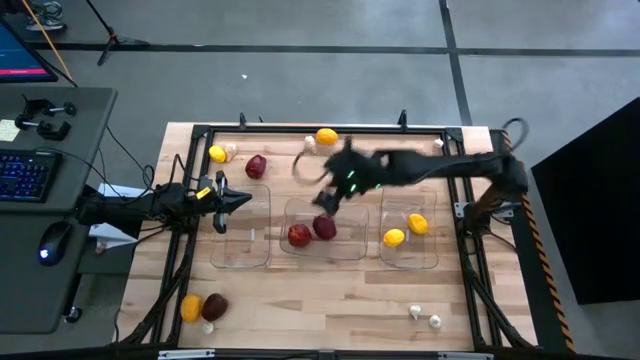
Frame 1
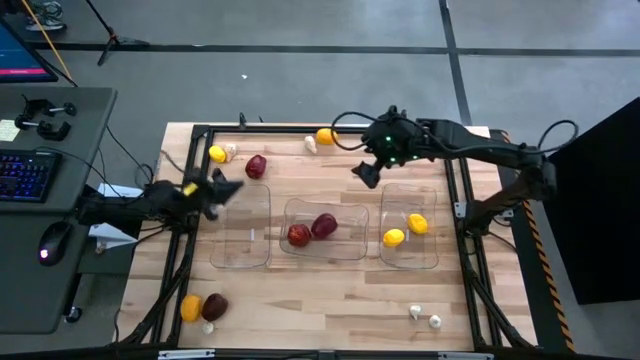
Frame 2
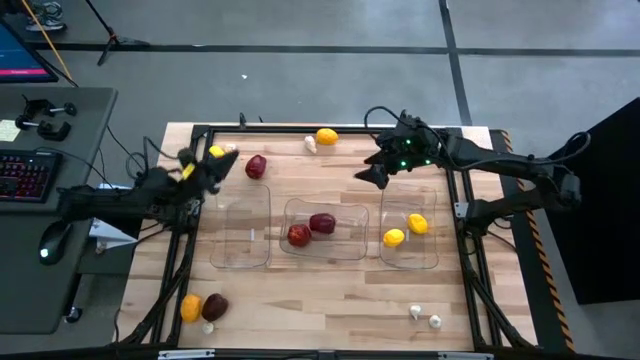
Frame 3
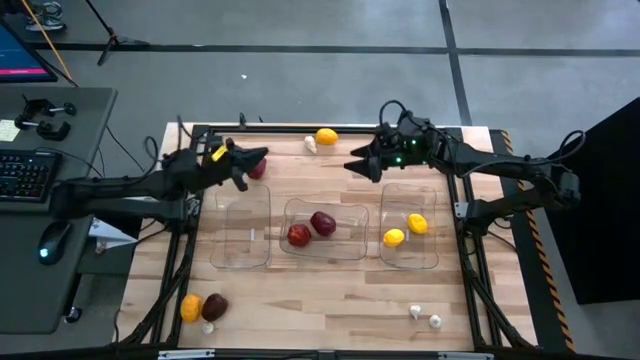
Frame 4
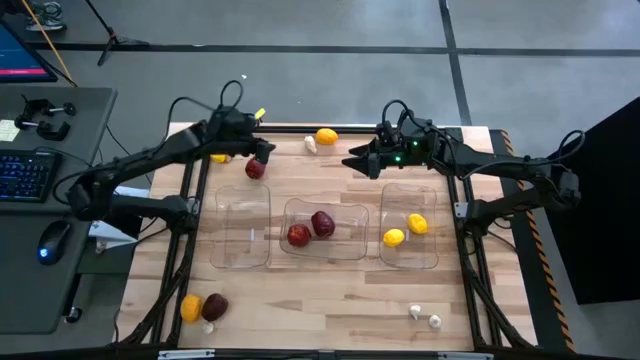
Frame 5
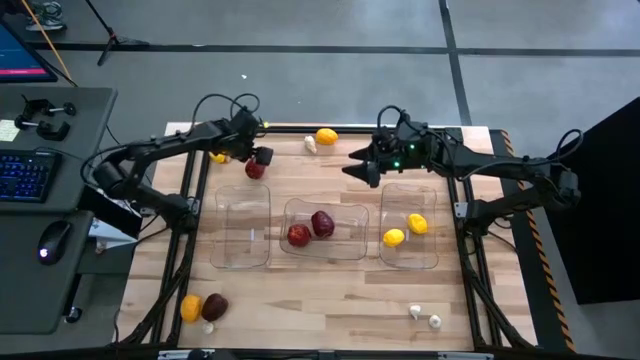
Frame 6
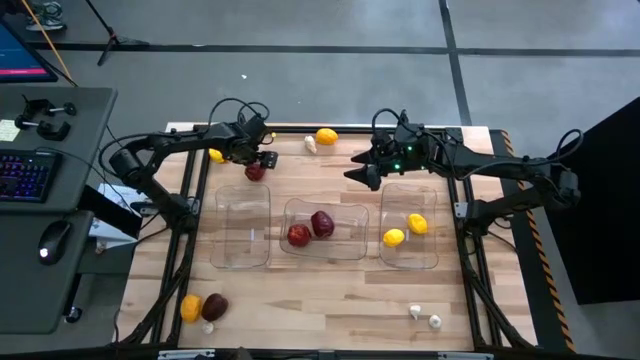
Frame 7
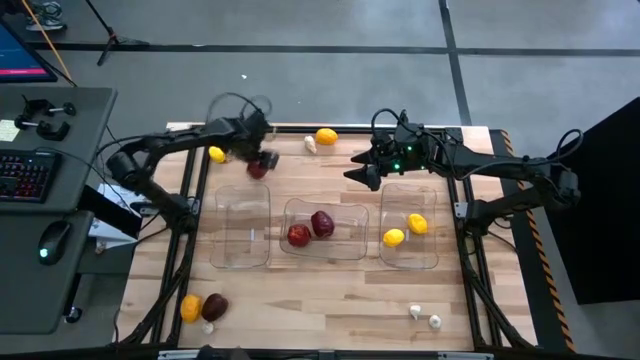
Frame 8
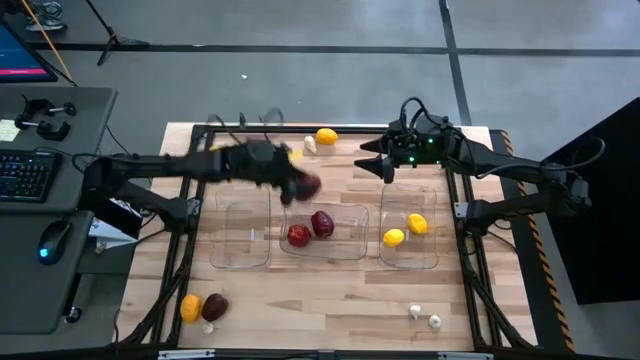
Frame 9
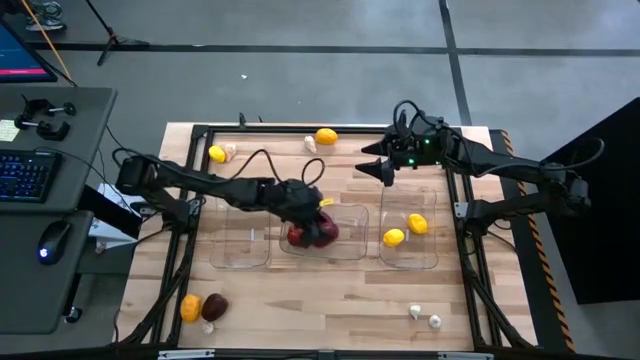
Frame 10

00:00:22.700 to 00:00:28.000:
Task: Sort produce into baskets
Put the top red apple into the center transparent bin

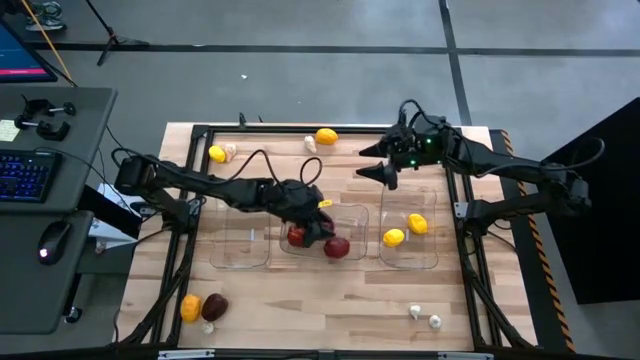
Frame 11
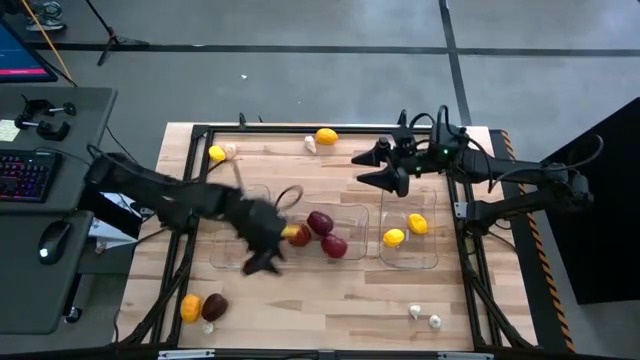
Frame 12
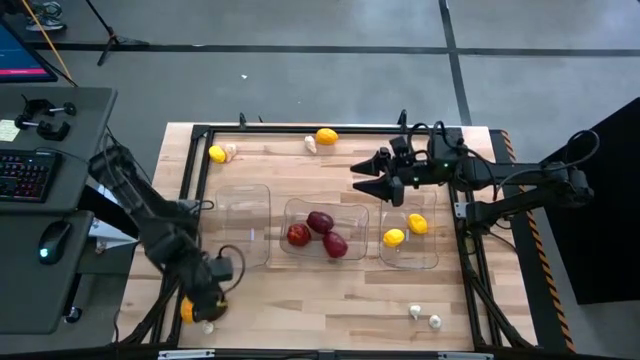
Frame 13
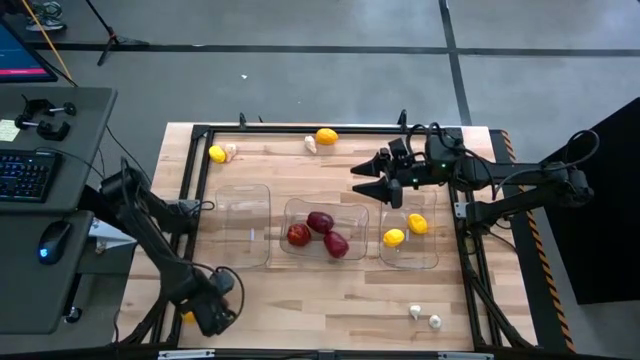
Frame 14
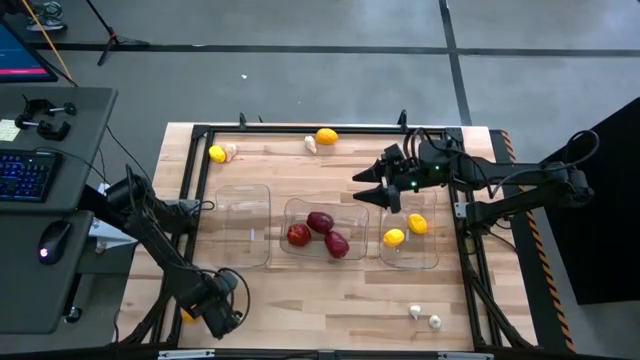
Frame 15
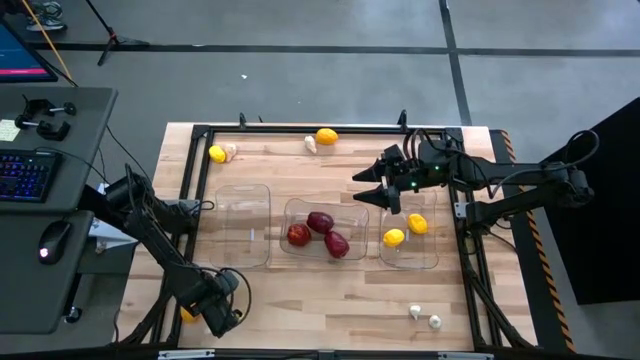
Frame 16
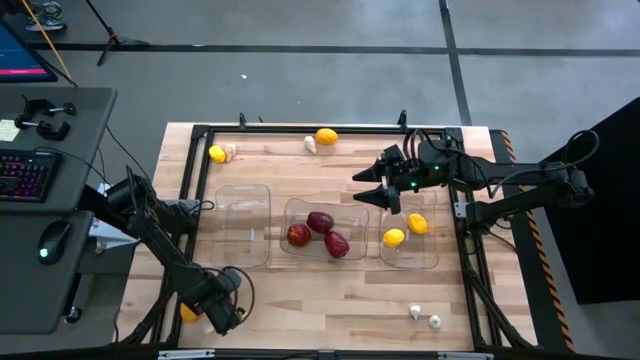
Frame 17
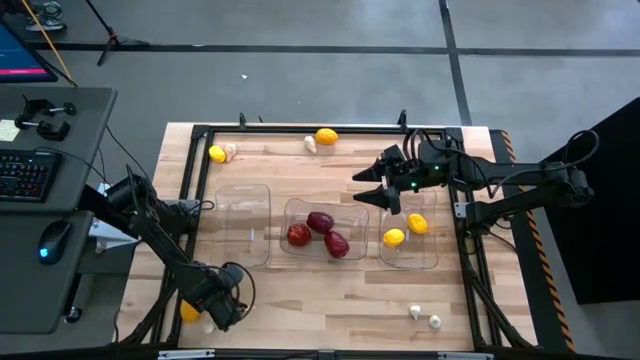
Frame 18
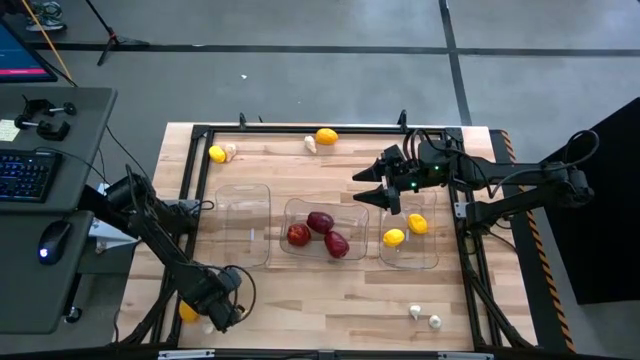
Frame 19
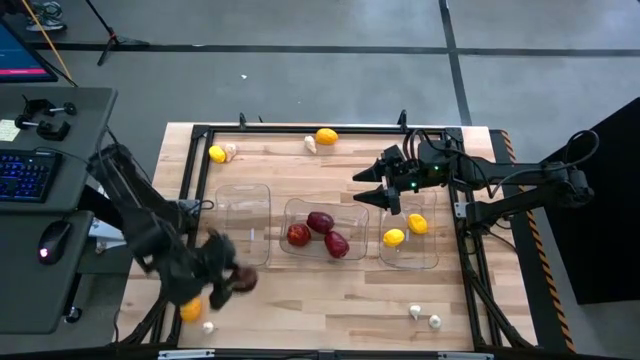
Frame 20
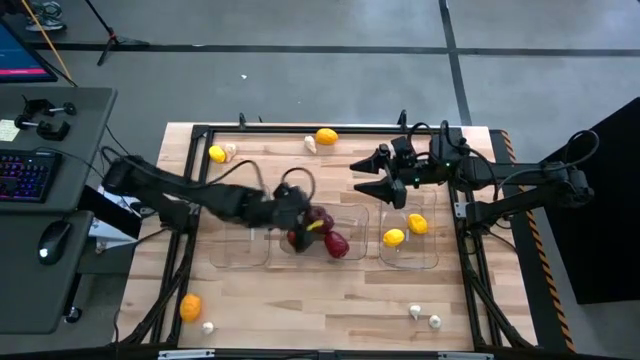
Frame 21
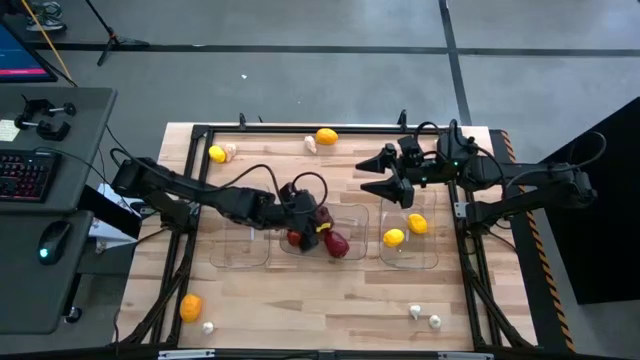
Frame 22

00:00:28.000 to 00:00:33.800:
Put the red apple into the center transparent bin

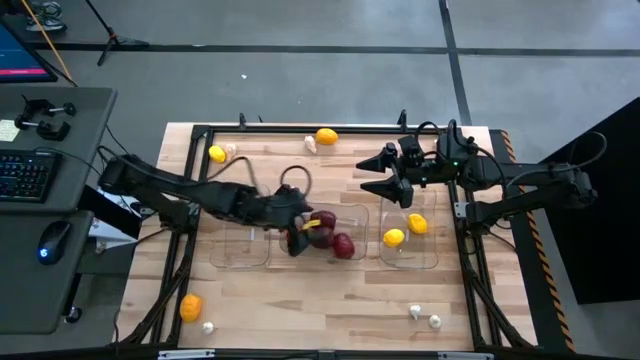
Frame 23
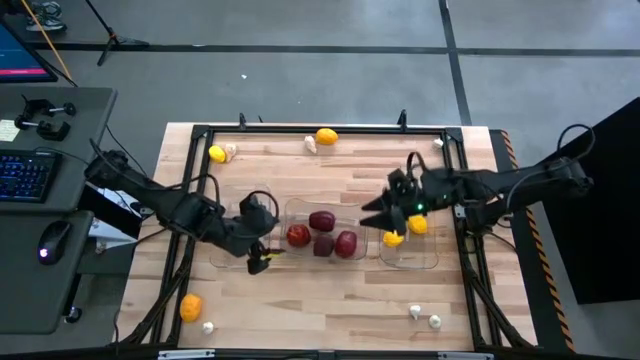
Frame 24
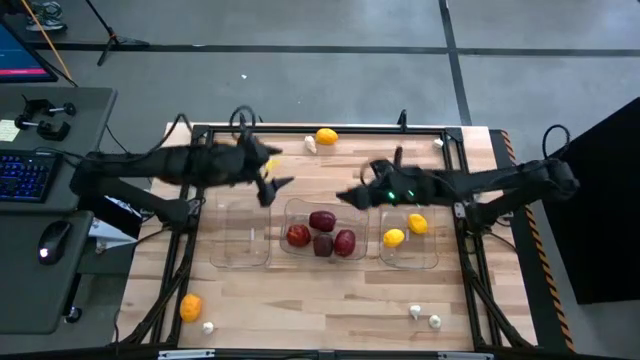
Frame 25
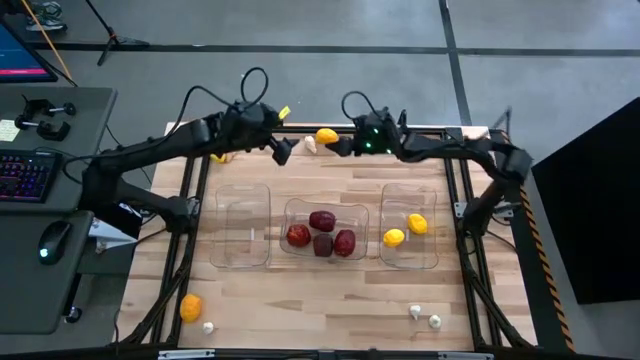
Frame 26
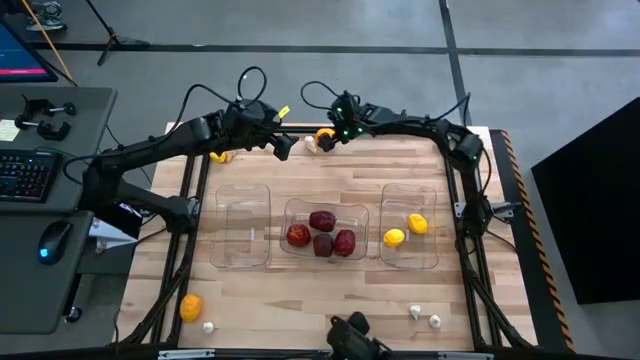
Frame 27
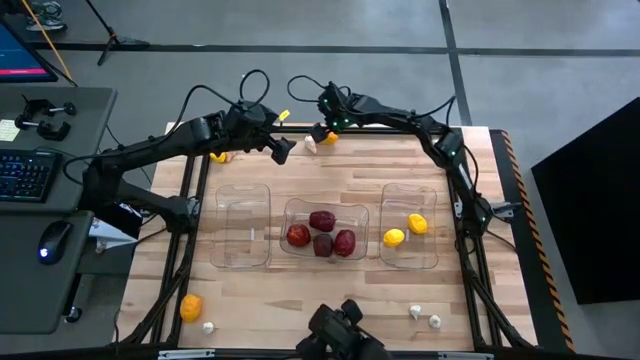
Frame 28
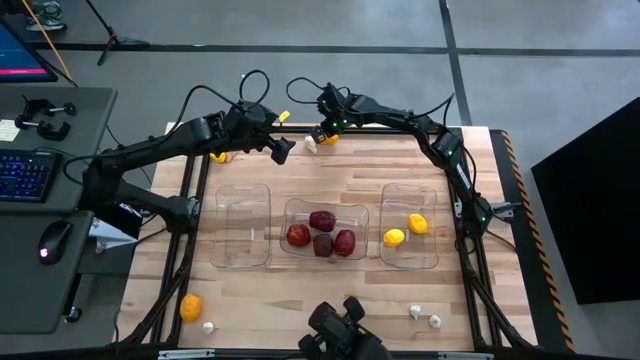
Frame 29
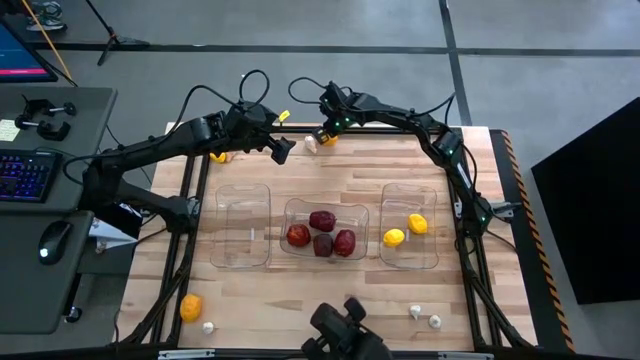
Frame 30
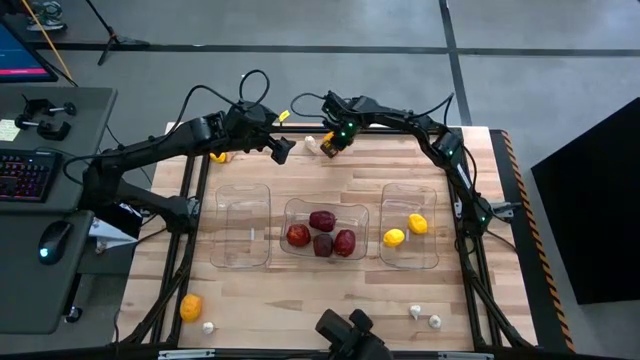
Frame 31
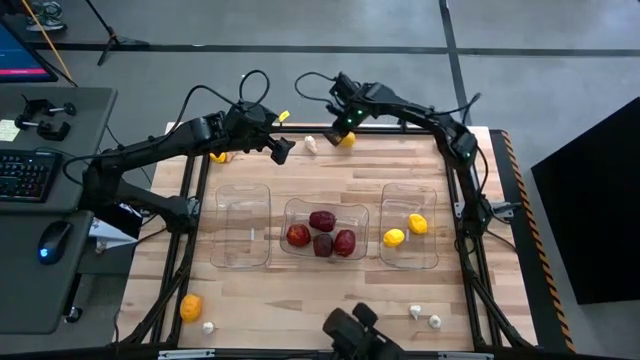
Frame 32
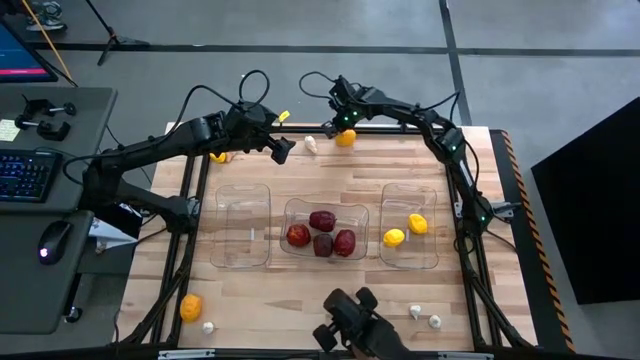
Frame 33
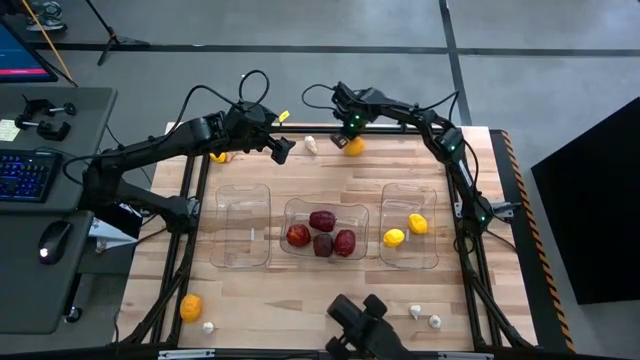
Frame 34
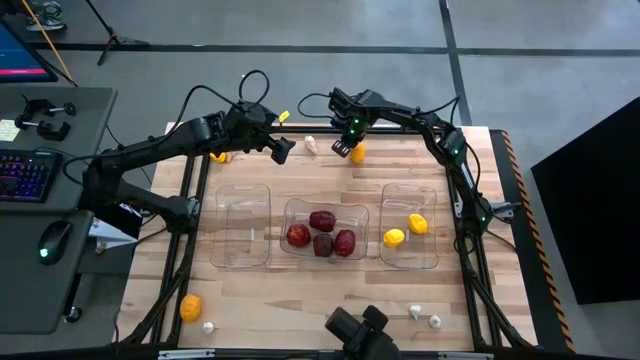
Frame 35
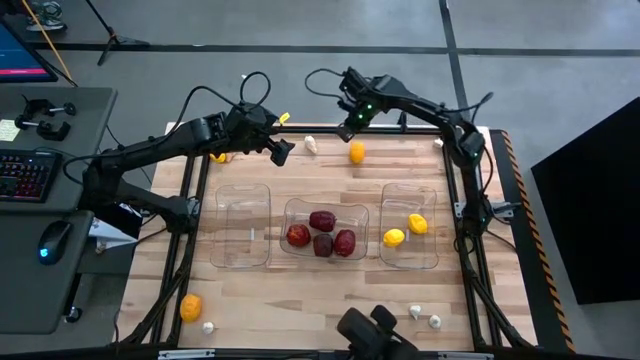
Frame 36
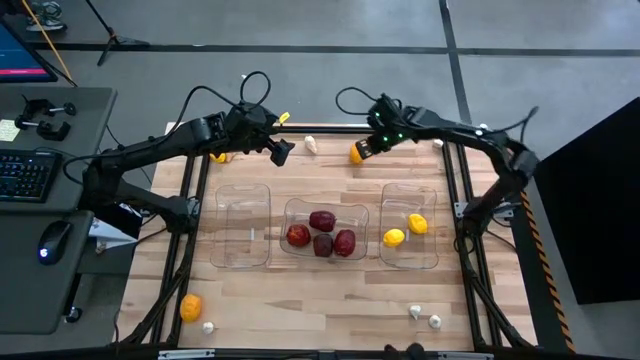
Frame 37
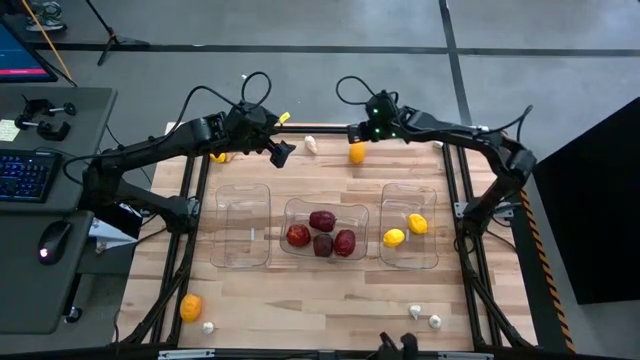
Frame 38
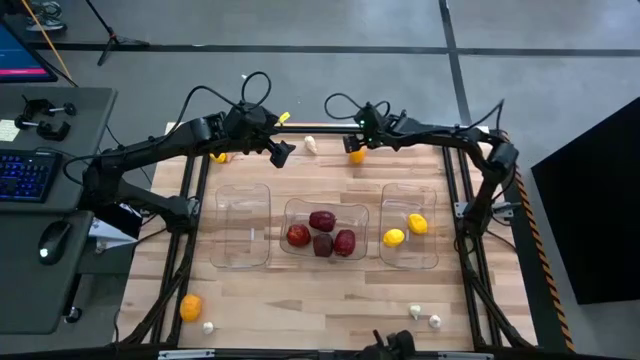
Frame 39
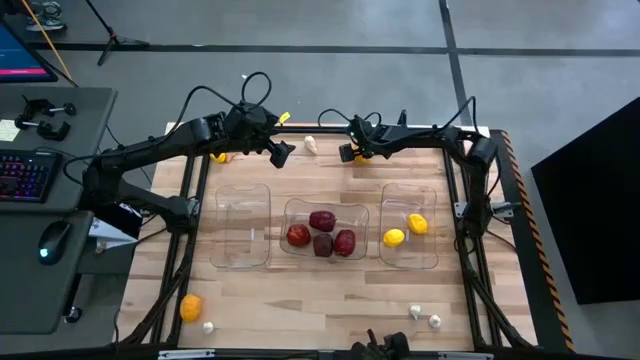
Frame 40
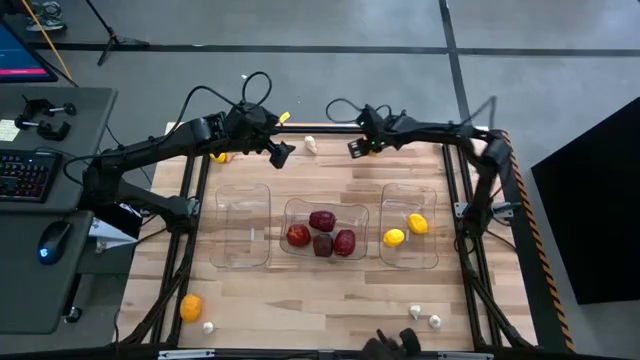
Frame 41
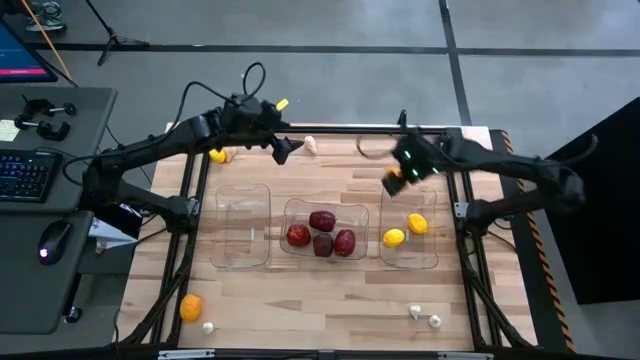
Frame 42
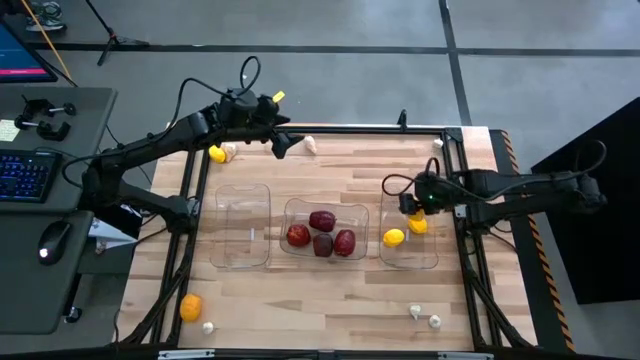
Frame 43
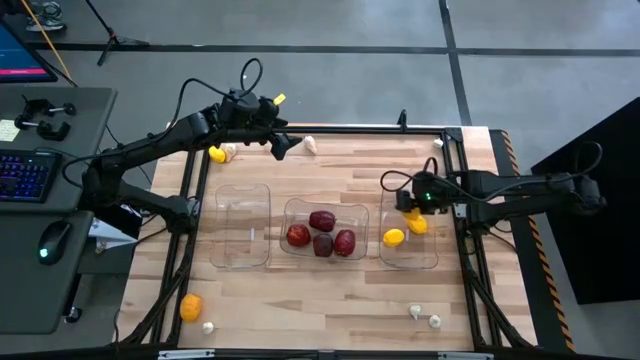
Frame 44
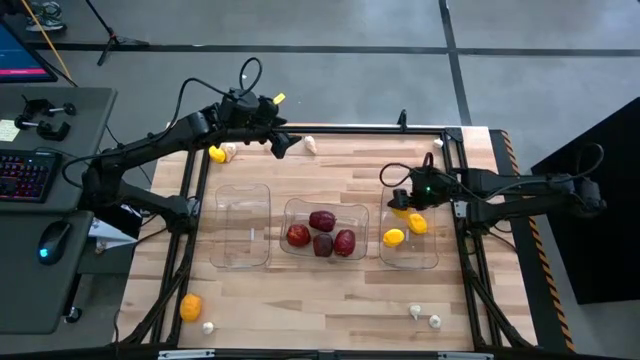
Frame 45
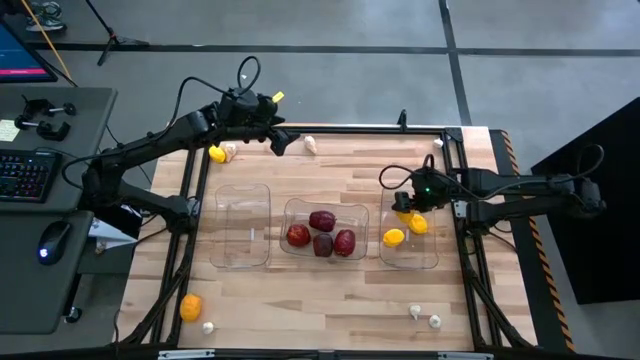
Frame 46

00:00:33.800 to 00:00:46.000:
Put the top right yellow lemon into the right transparent bin
